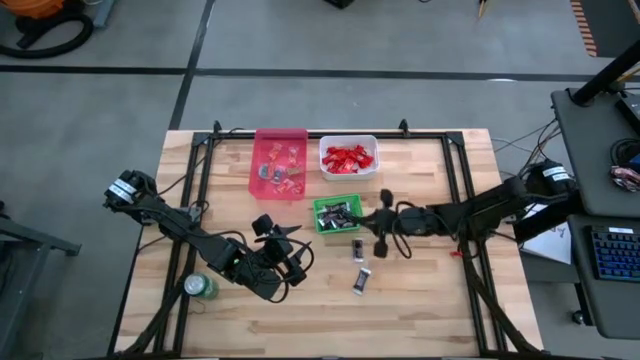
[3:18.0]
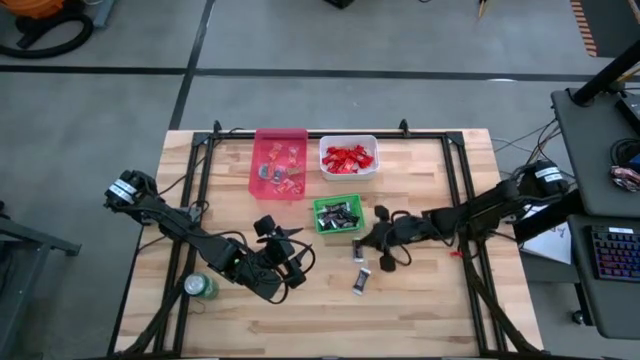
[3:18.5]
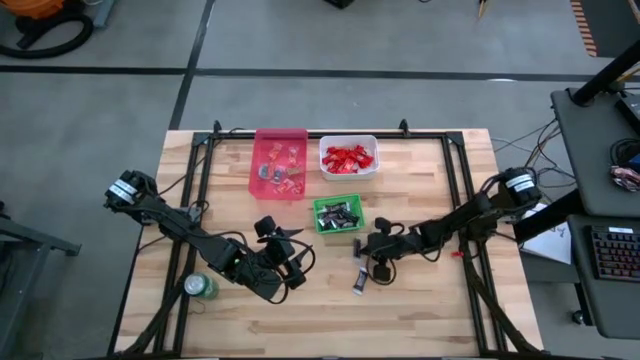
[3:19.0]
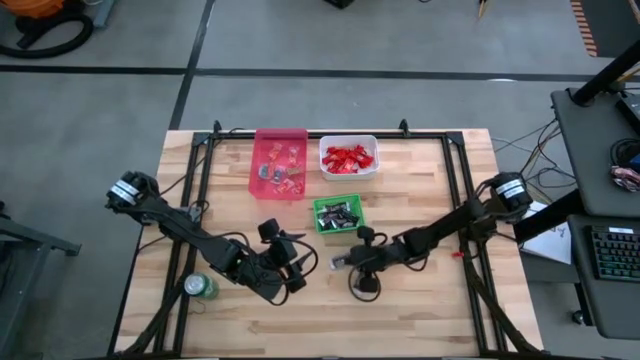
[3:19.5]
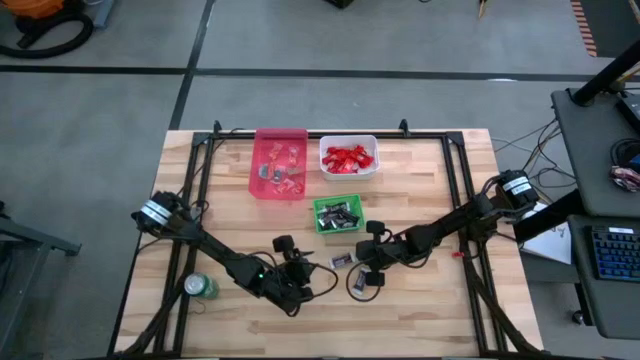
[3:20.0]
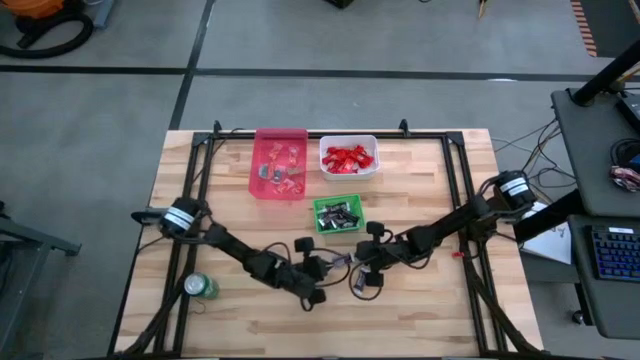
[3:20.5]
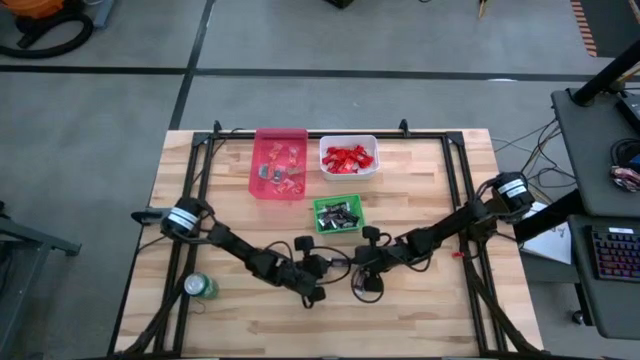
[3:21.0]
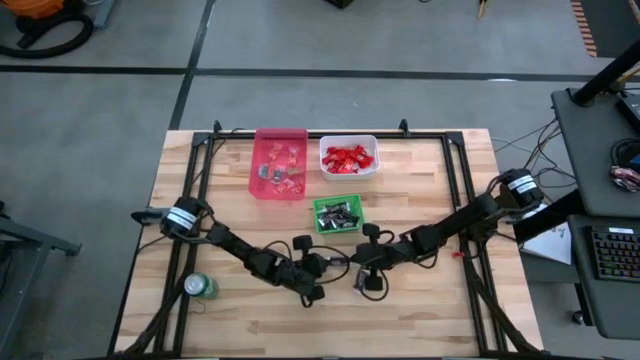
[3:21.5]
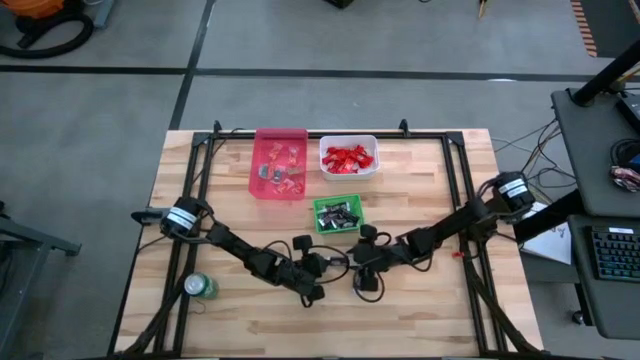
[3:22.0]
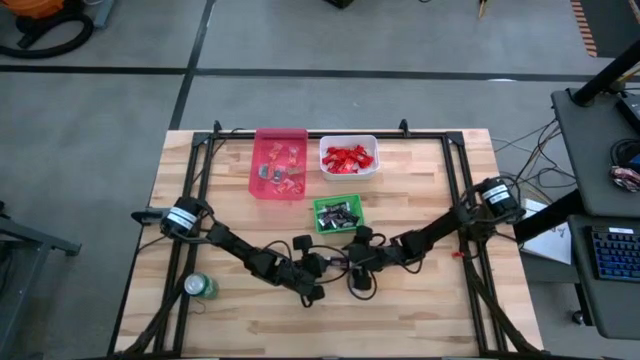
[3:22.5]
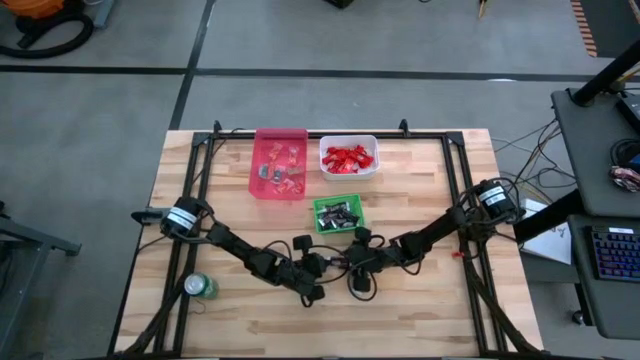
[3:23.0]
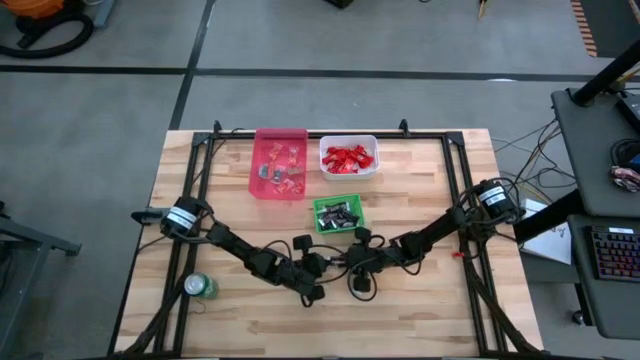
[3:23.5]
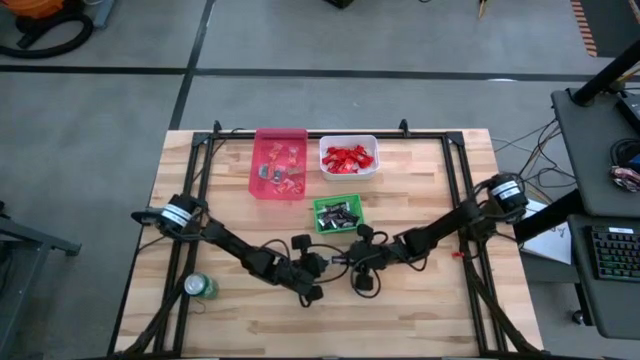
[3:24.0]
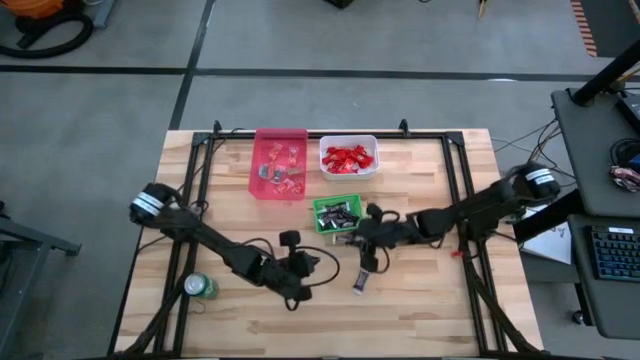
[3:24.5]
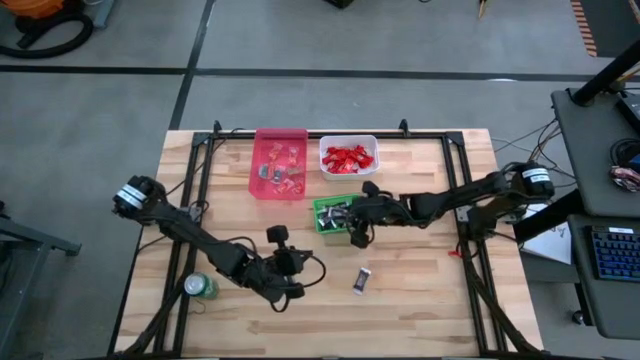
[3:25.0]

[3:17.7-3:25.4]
Task: Sort candy
Put the brown chocolate bar into the green bin

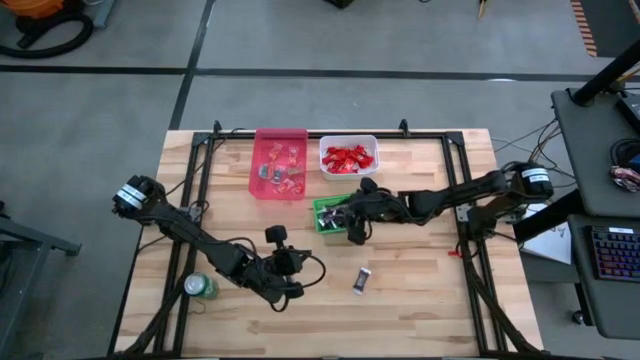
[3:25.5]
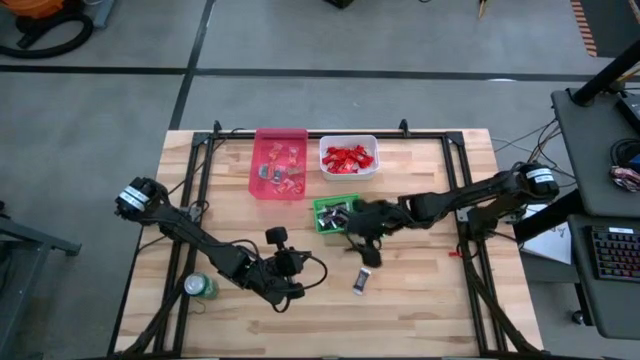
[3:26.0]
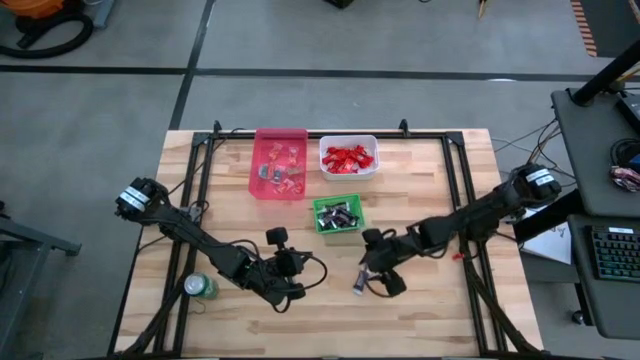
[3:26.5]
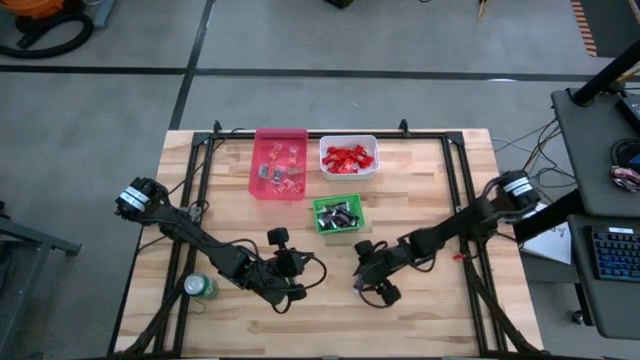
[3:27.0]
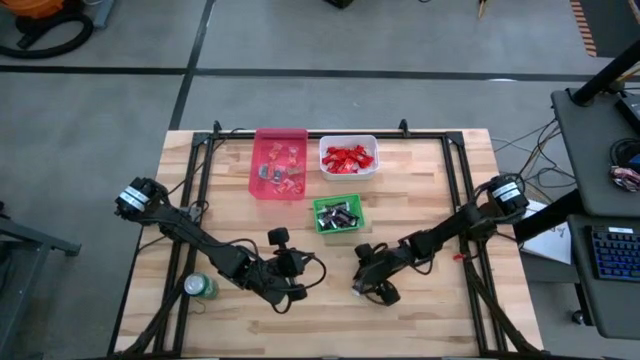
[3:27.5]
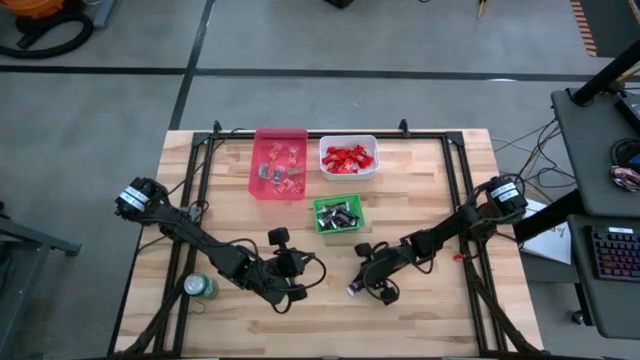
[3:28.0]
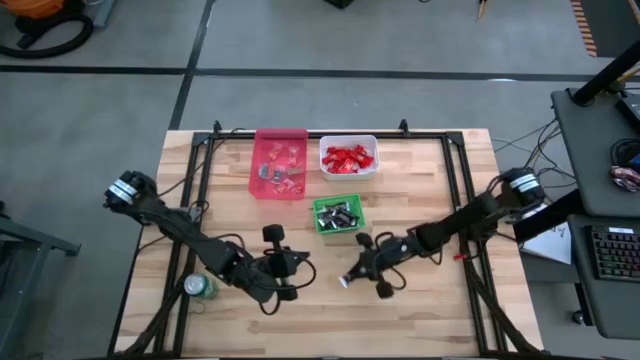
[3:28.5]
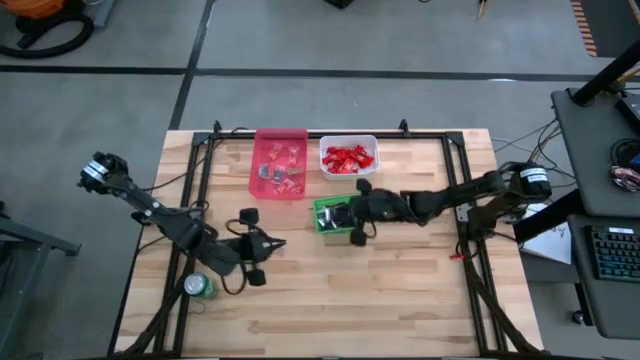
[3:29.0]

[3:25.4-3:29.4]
Put the brown chocolate bar into the green bin

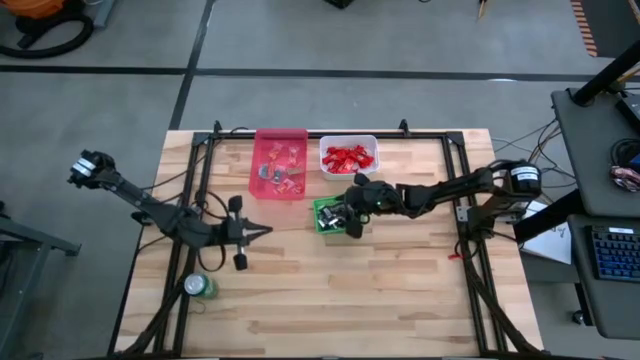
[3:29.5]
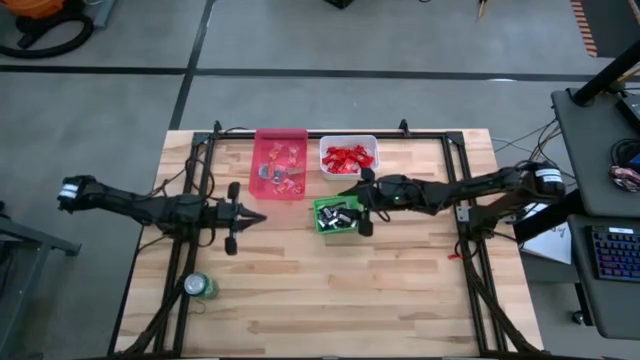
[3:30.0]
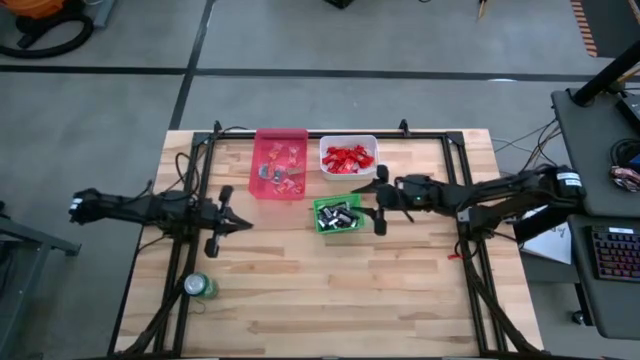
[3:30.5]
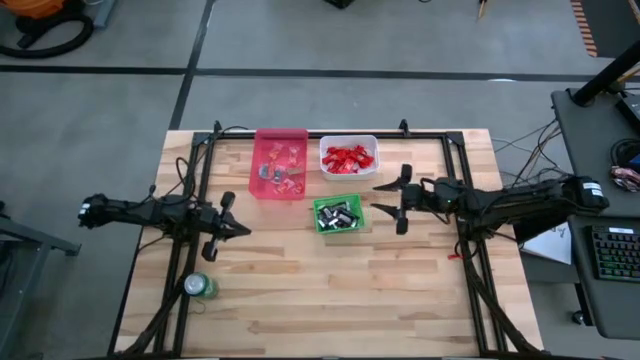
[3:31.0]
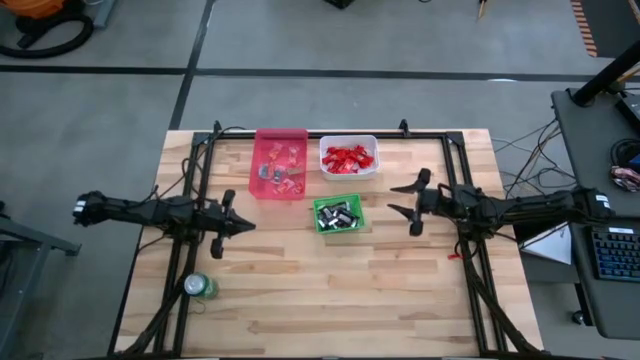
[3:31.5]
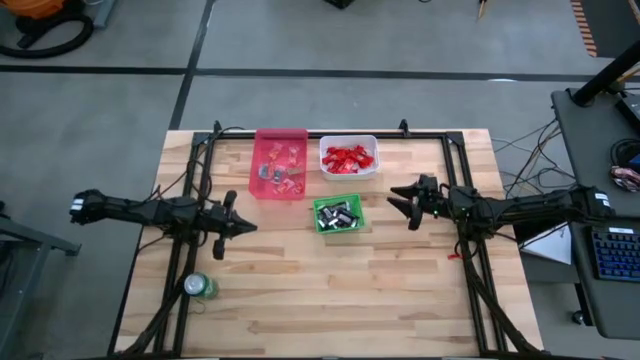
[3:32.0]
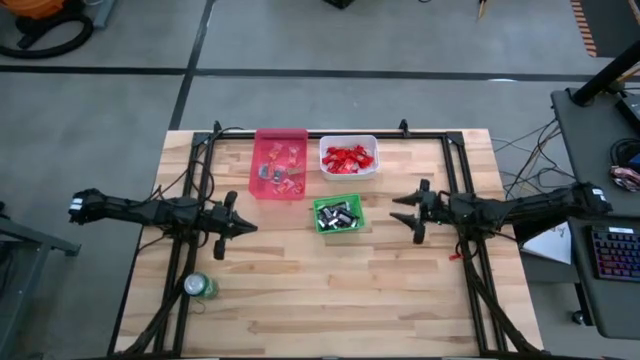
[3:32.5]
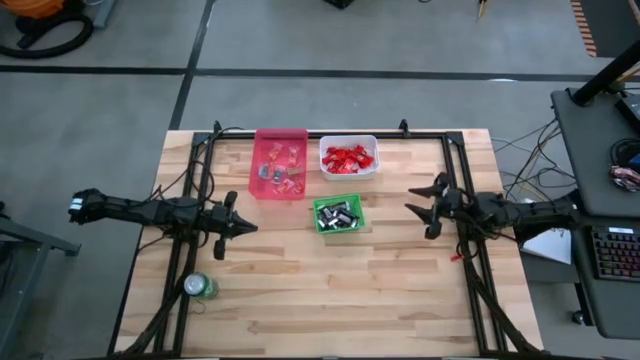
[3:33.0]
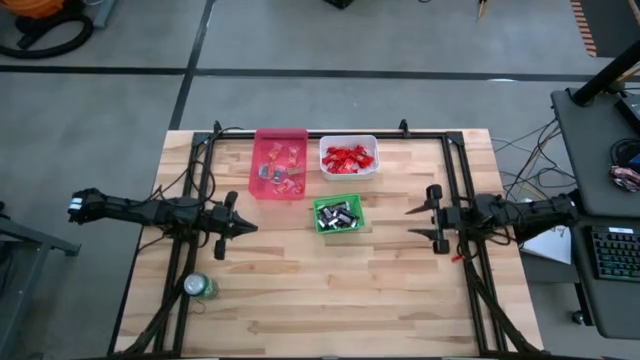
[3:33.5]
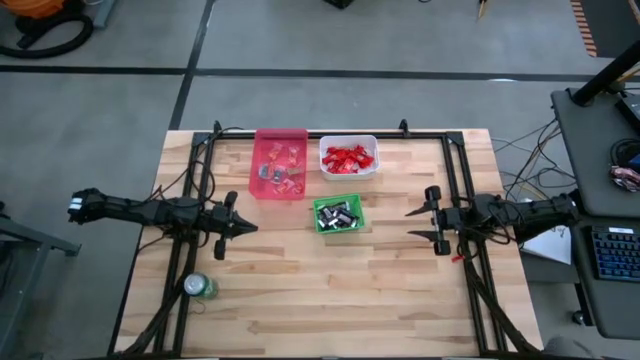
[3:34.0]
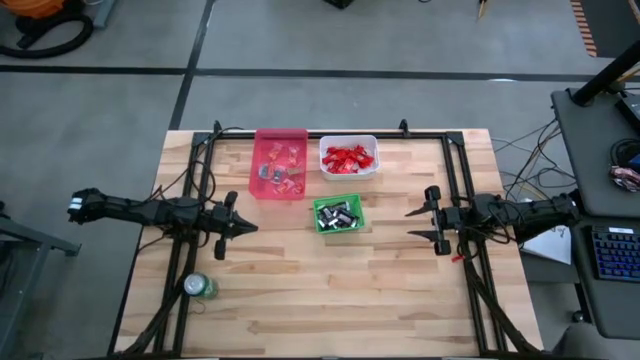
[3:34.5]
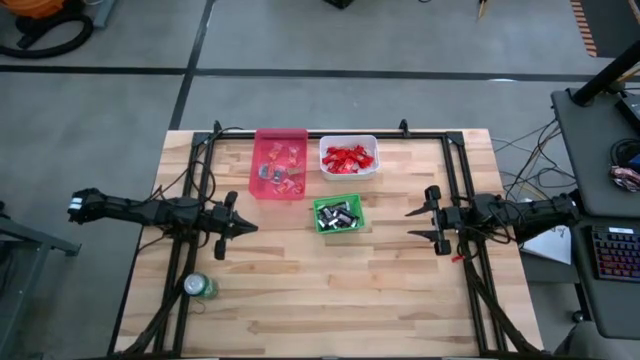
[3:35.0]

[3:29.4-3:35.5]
Return to Home position

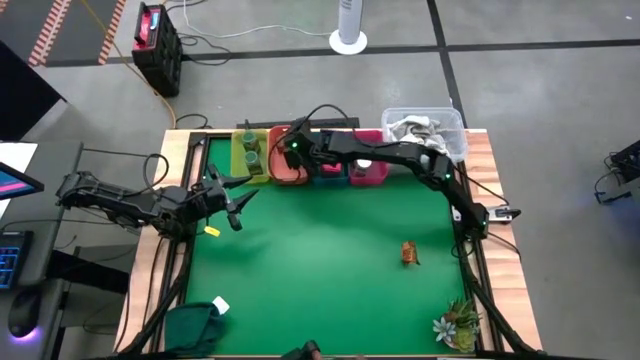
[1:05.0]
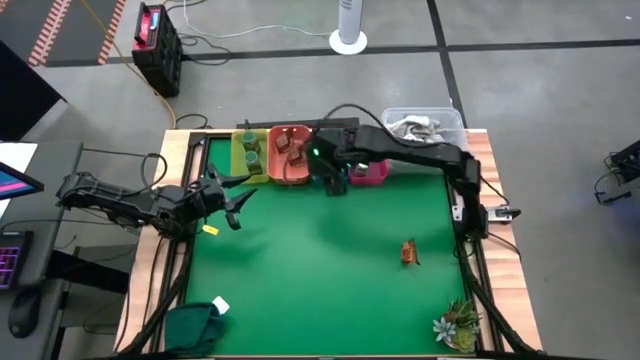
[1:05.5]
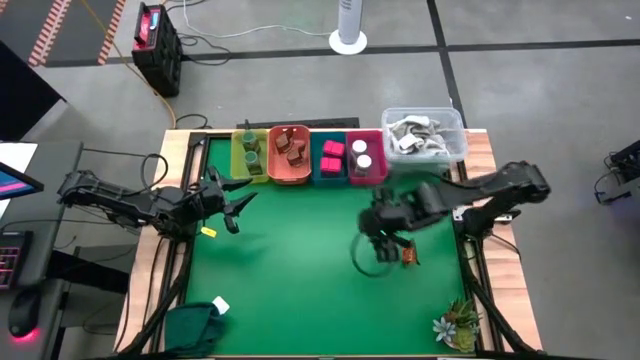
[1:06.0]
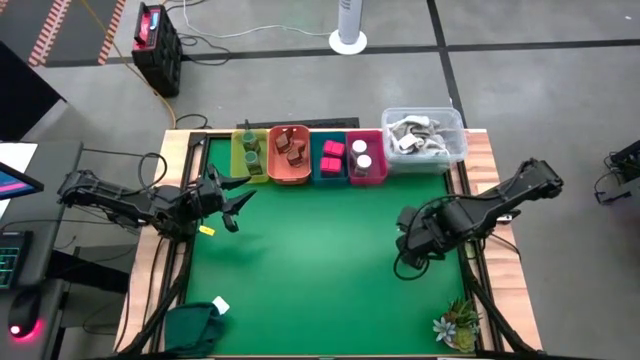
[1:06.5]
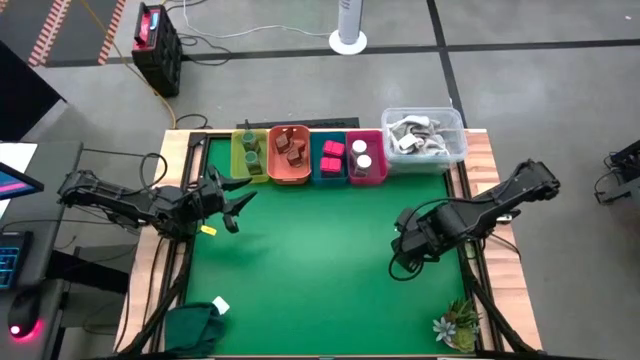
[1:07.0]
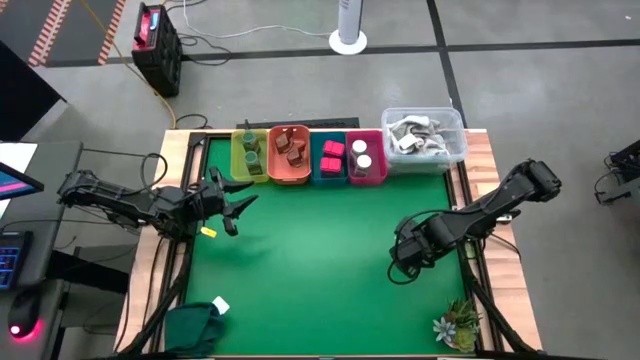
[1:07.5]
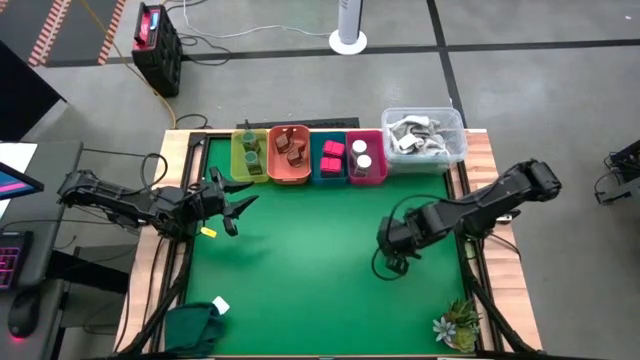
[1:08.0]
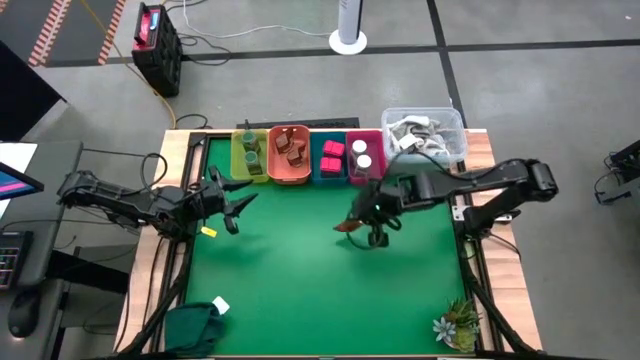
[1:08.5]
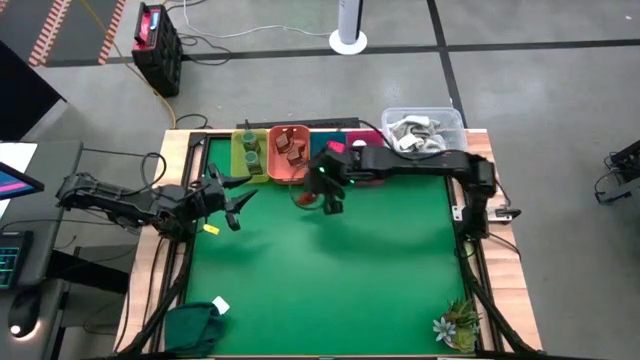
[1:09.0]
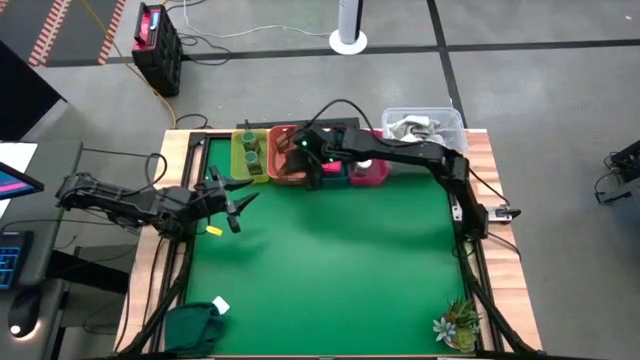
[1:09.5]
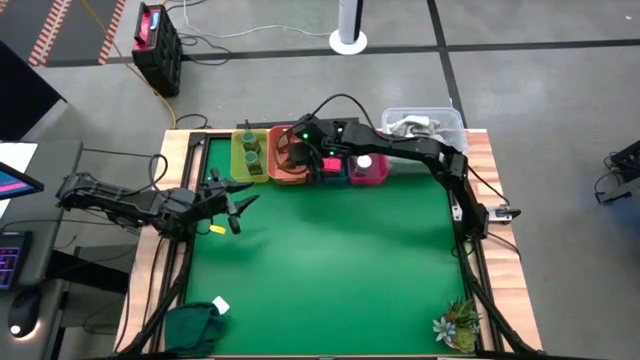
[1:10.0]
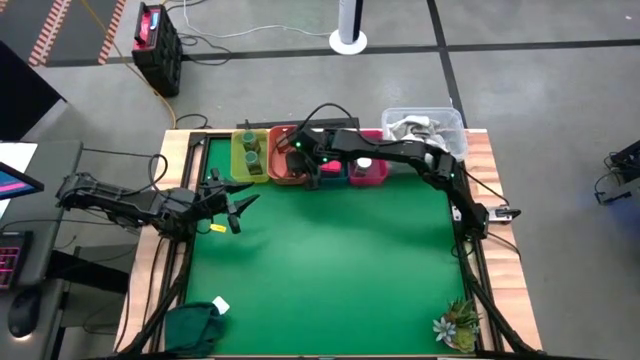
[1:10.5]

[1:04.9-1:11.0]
Task: Sort spices by type
Put the orange seasoning bag into the orange bin
